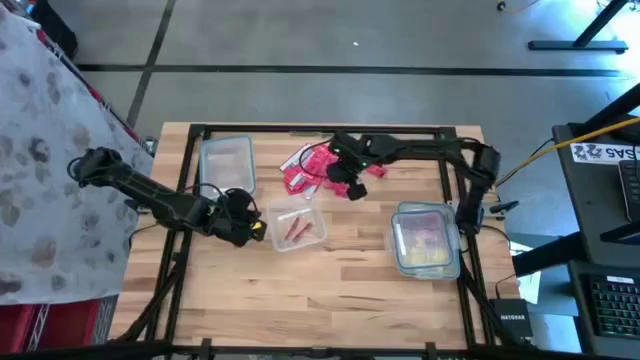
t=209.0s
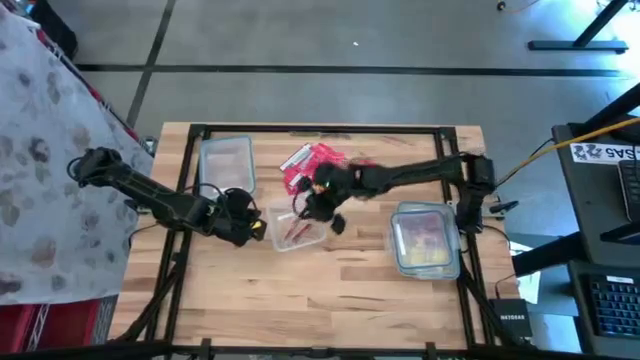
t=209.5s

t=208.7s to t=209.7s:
Task: Sort candy
Put the red candy stick into the square transparent bin

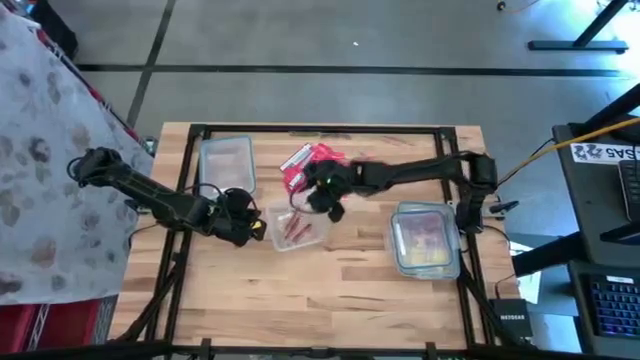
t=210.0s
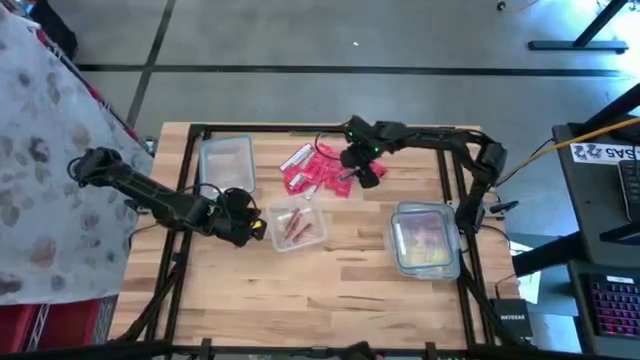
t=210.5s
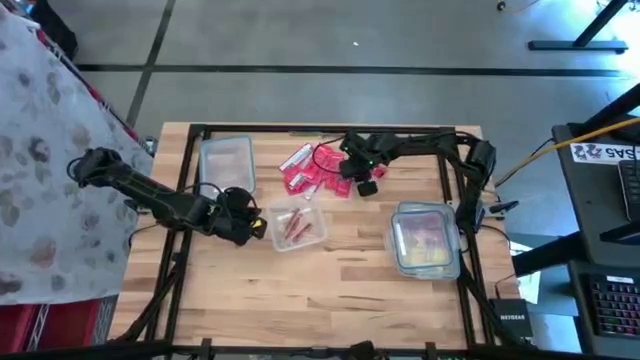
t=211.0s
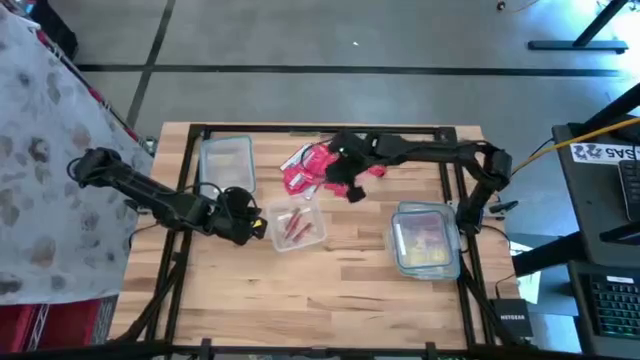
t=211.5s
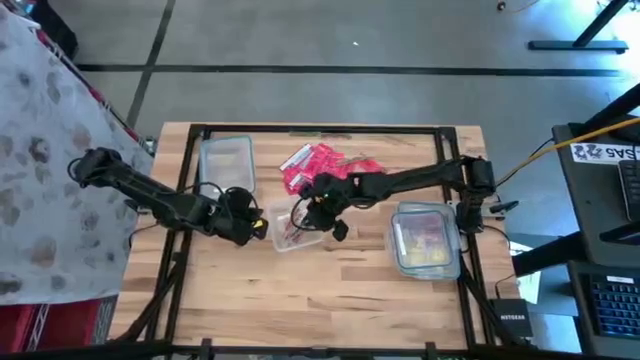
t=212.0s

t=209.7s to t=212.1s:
Put the blue candy stick into the square transparent bin

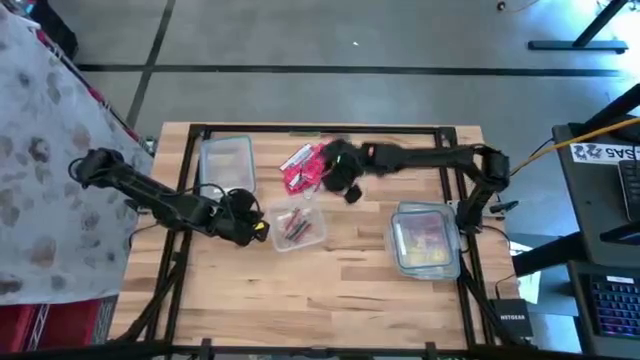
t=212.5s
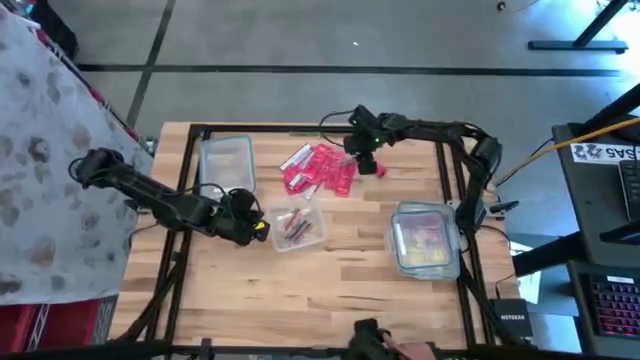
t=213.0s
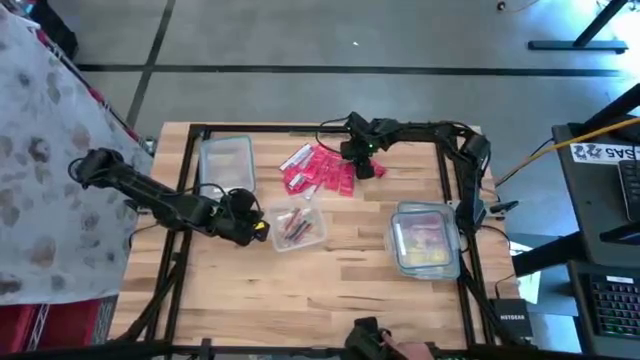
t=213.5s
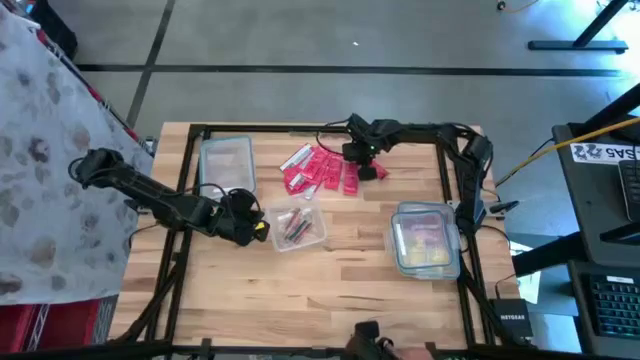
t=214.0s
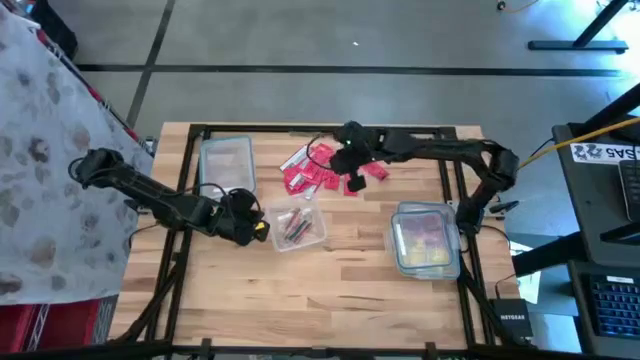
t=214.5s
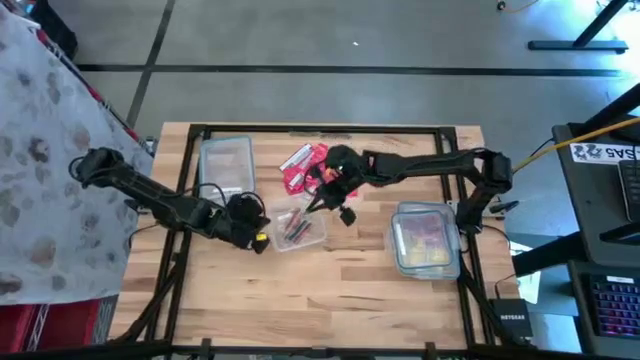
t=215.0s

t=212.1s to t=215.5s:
Put the green candy stick into the square transparent bin

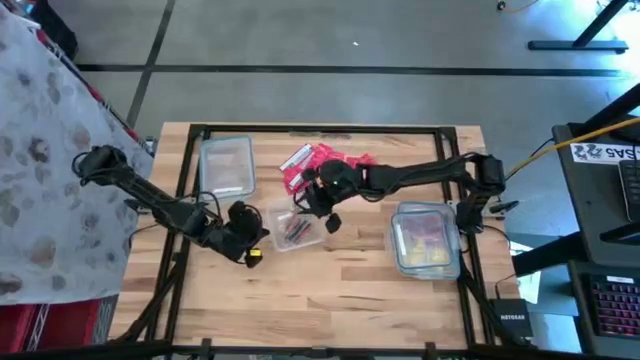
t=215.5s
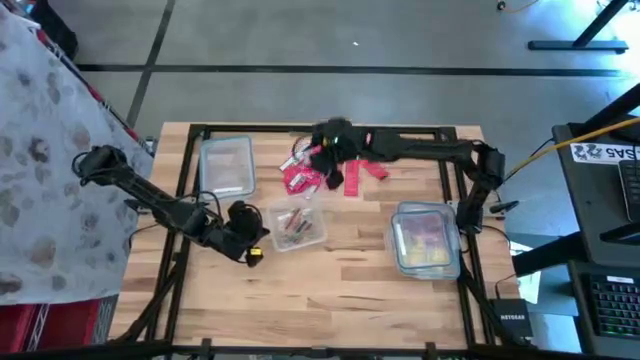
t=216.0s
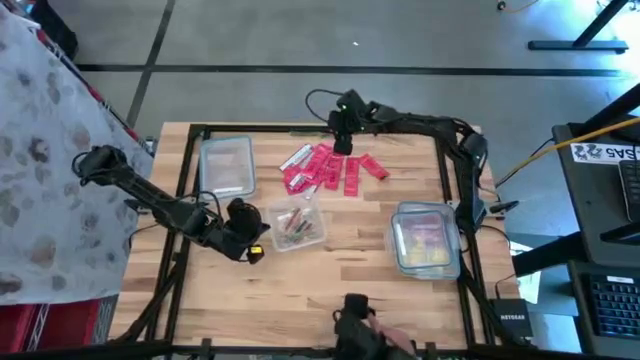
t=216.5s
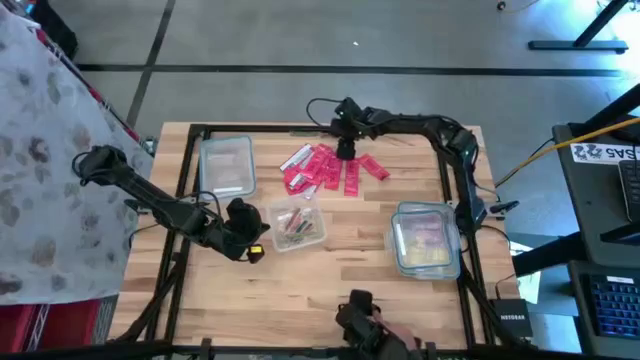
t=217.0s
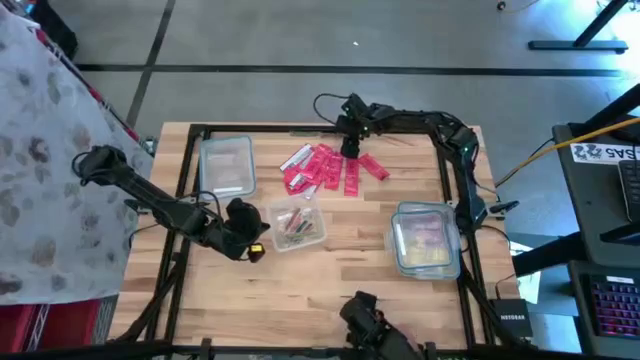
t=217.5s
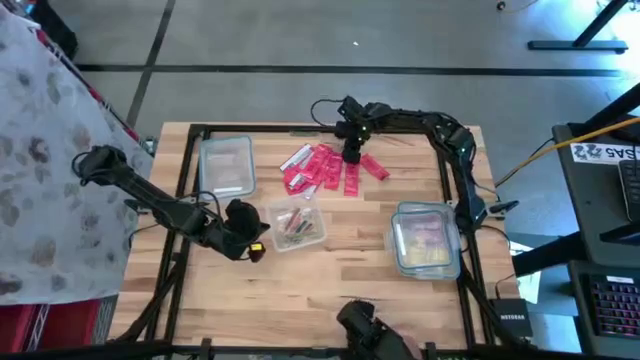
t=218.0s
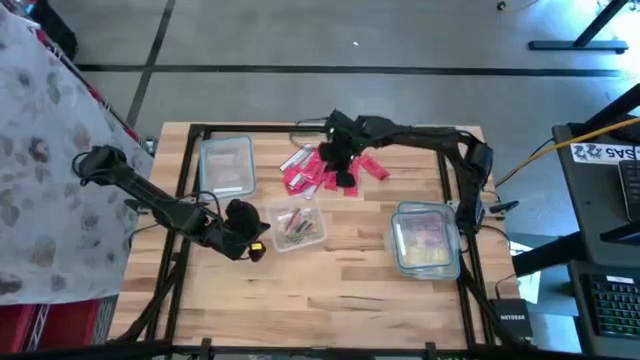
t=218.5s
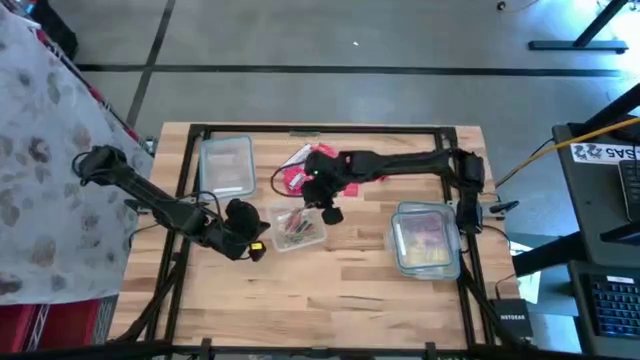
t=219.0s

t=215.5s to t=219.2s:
Put the red candy stick into the square transparent bin

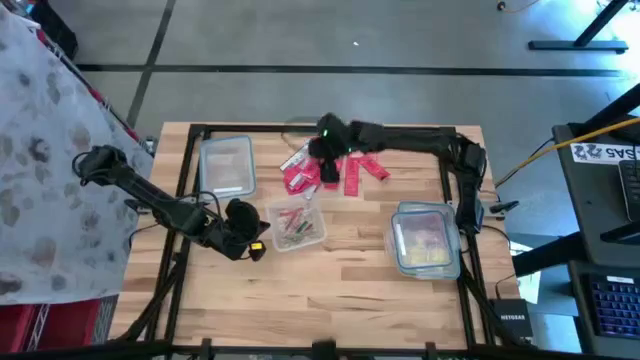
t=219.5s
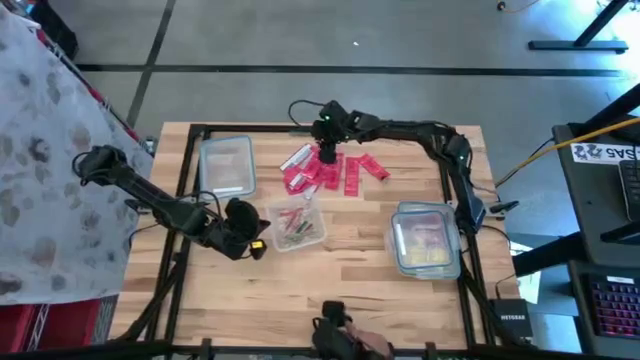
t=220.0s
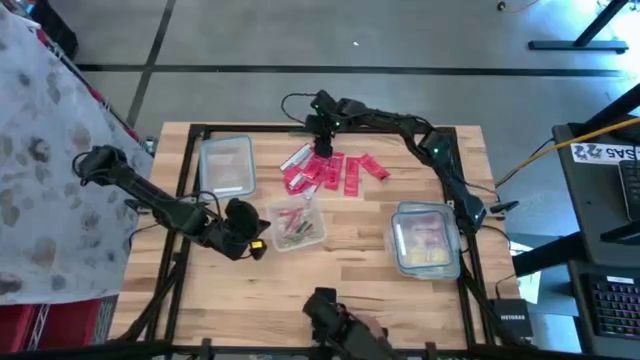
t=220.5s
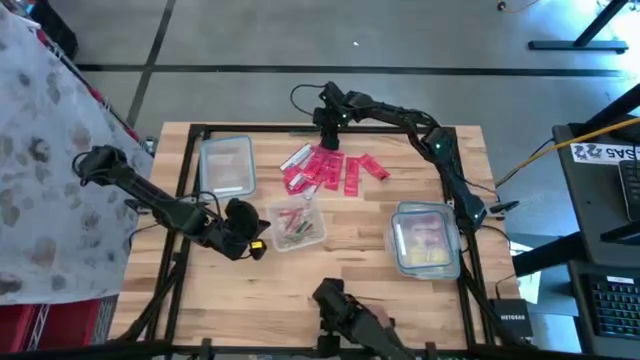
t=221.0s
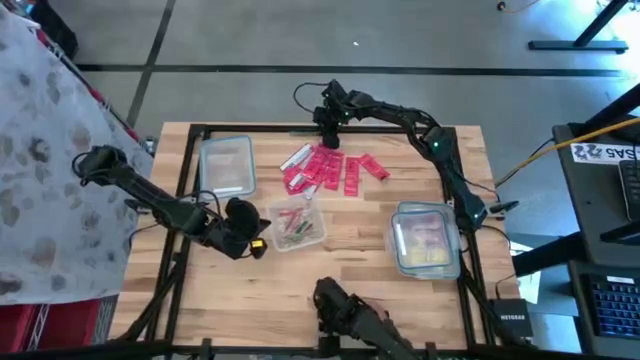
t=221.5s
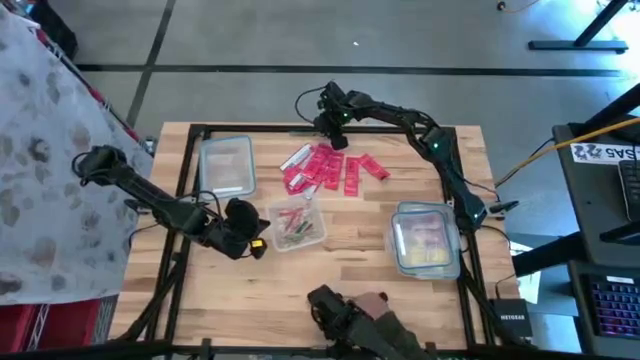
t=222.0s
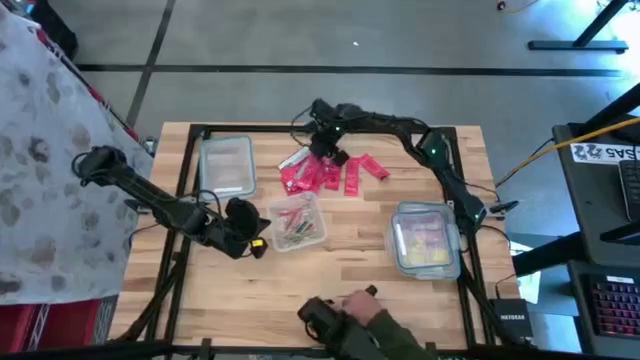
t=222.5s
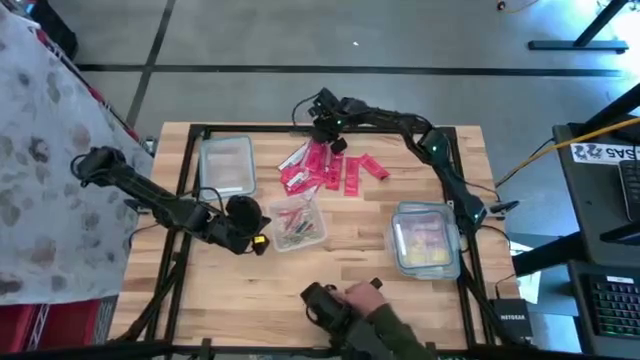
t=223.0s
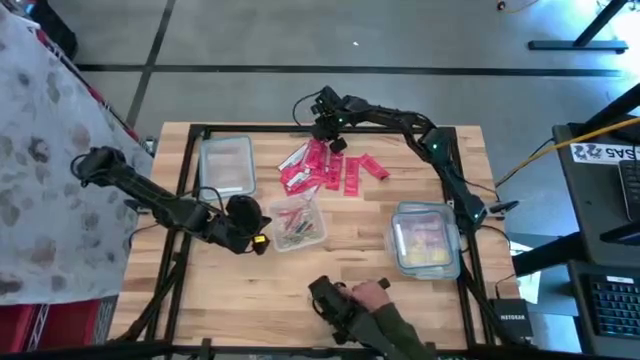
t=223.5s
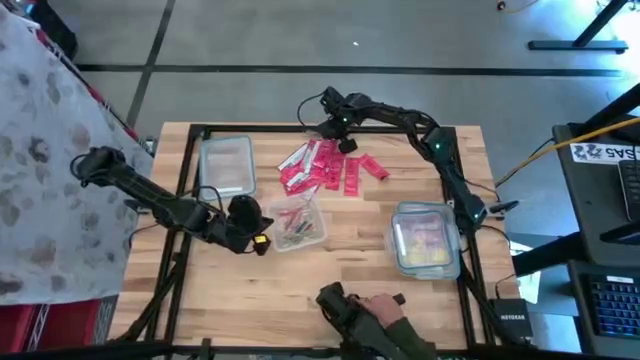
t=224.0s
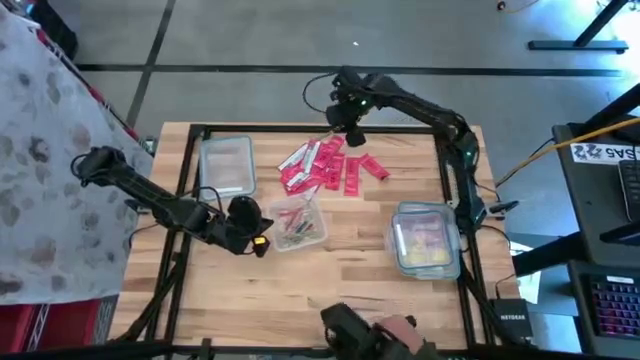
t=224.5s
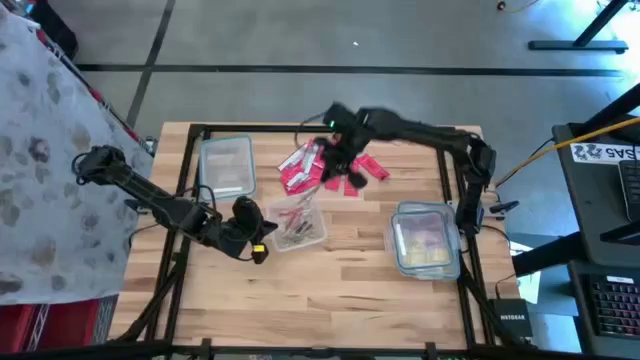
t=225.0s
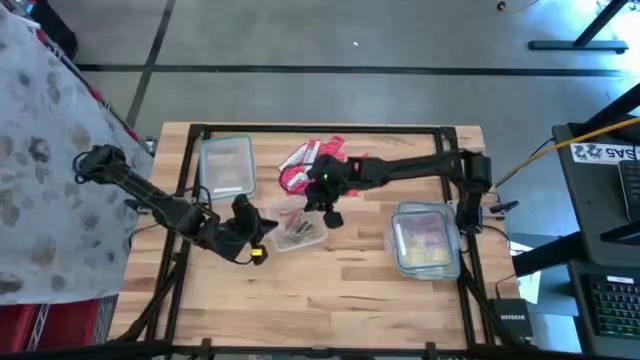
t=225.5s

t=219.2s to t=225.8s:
Put the green candy stick into the square transparent bin

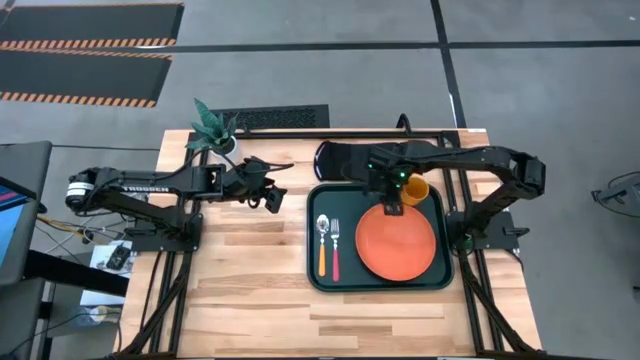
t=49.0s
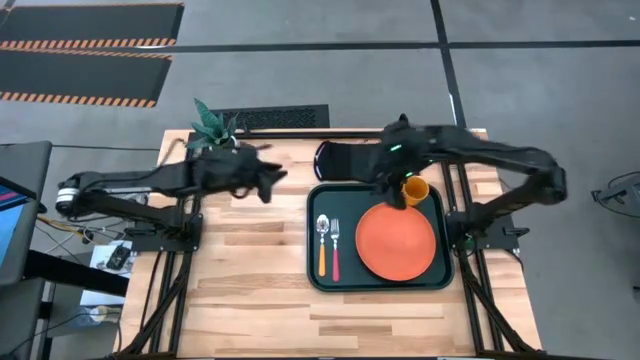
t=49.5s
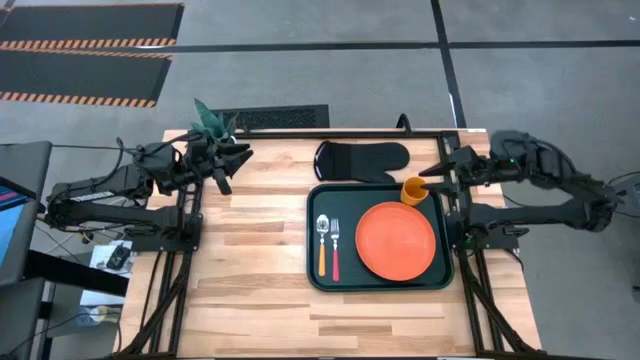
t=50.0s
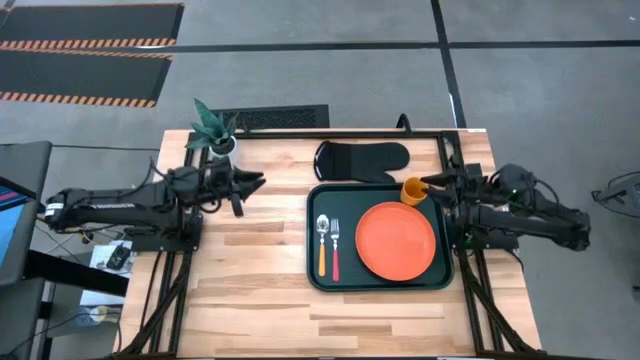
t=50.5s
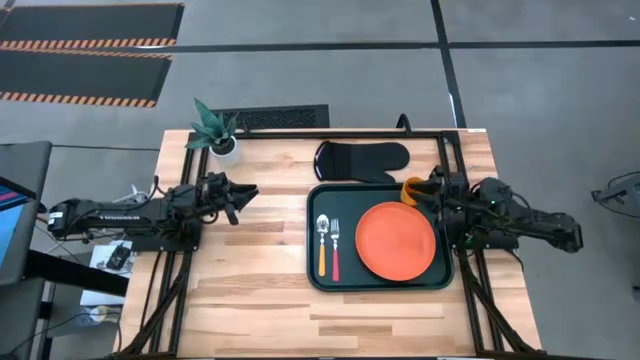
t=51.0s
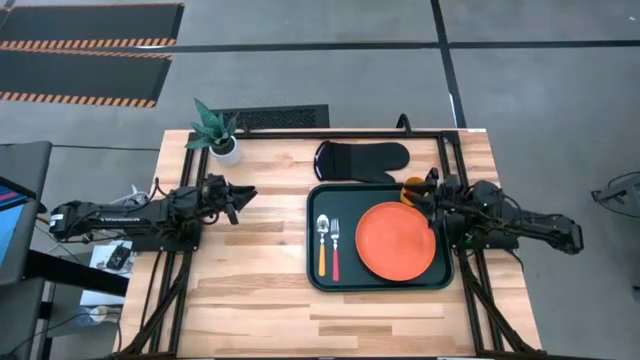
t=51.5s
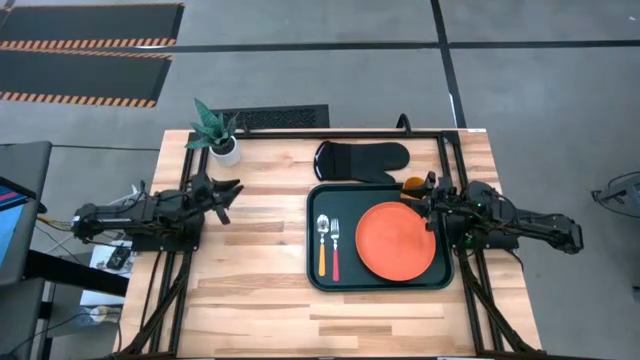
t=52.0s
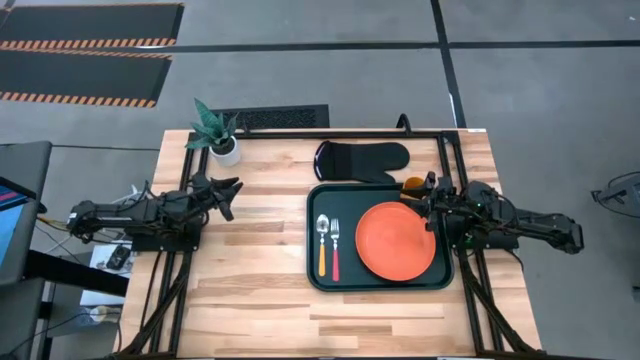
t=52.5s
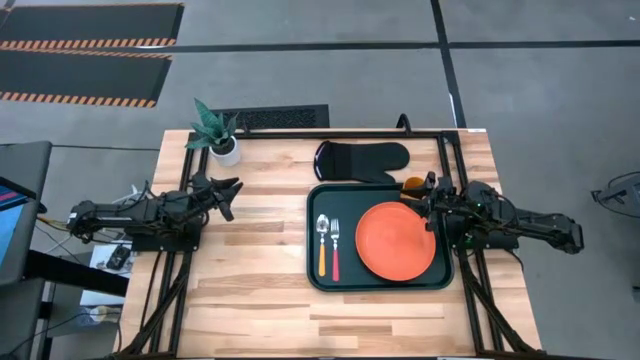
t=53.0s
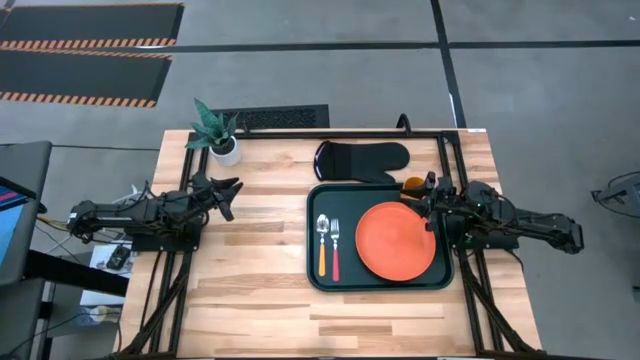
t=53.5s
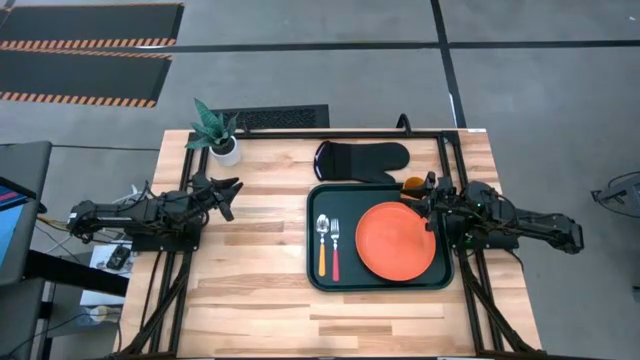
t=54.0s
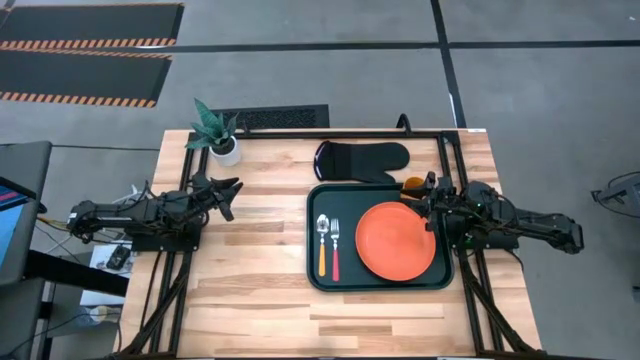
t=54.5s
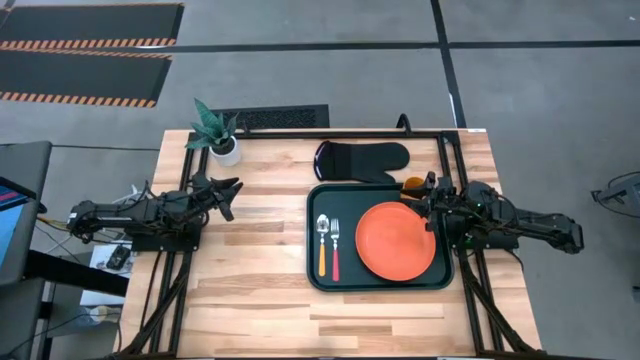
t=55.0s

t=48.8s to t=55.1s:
Task: Pick and place plate/cup/fork/spoon on tray
Return to Home Position
